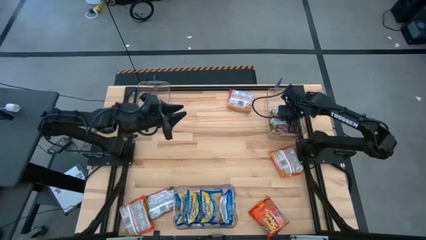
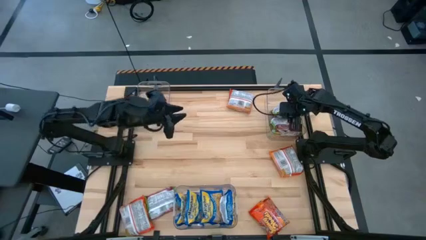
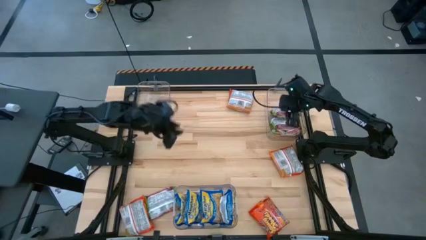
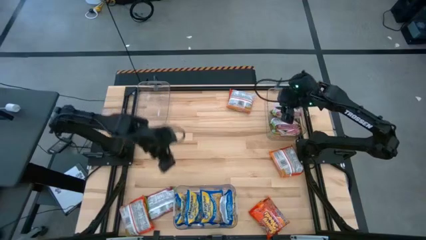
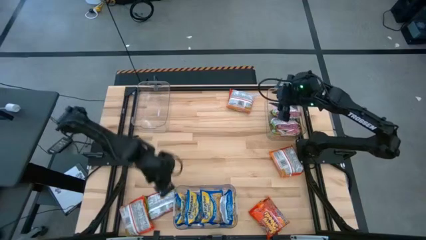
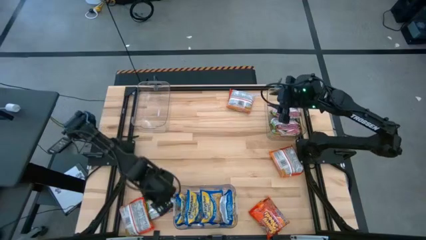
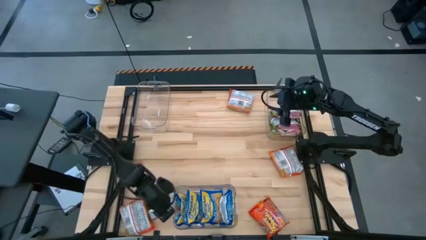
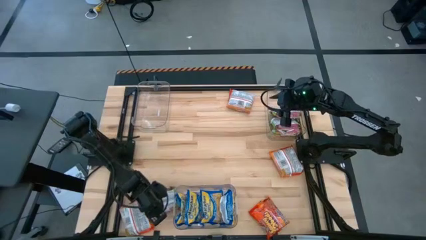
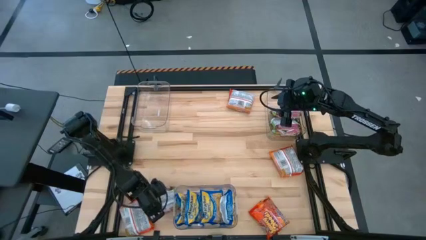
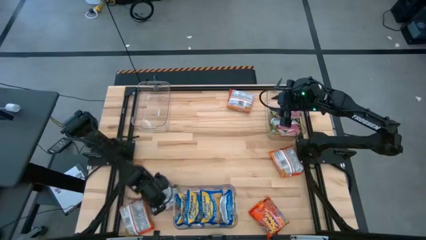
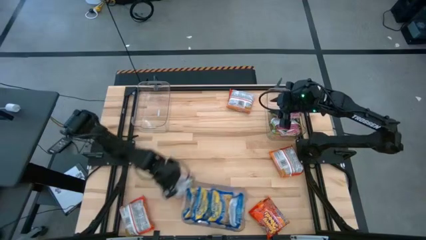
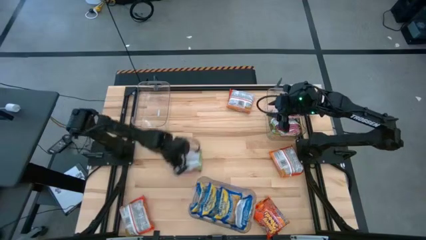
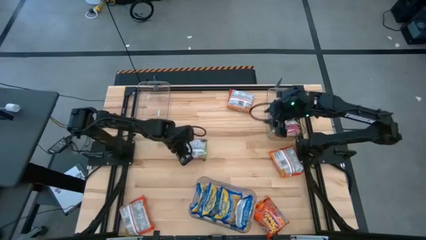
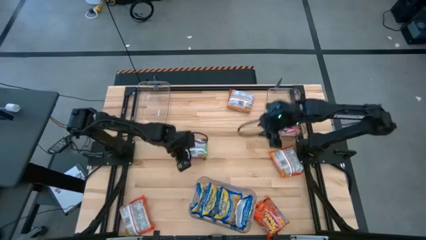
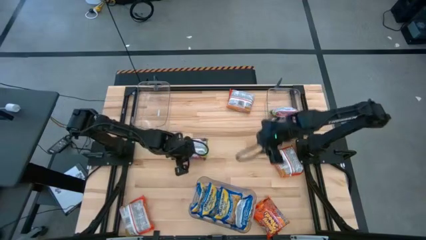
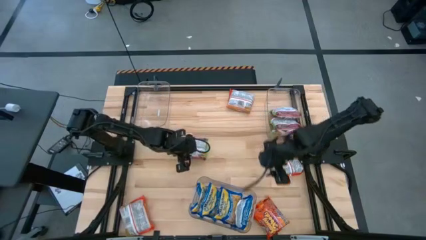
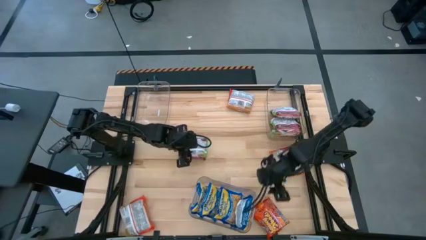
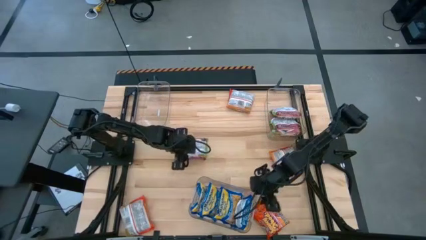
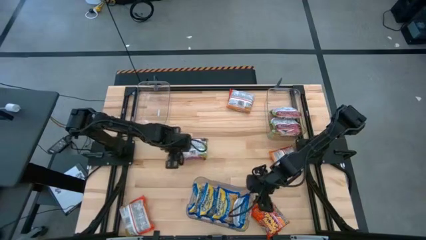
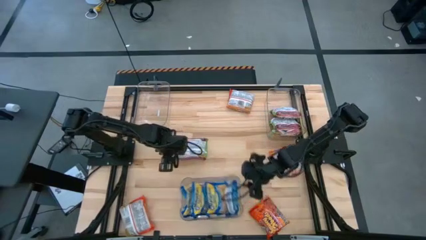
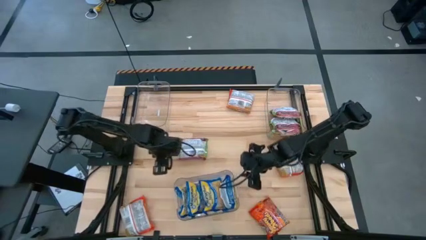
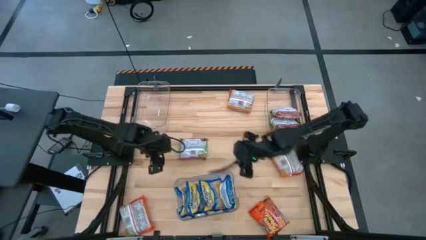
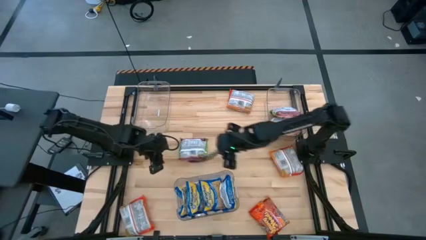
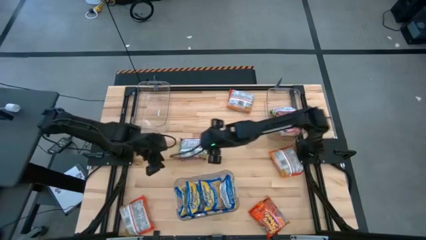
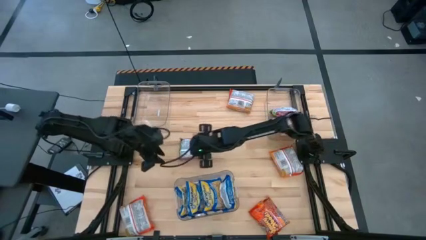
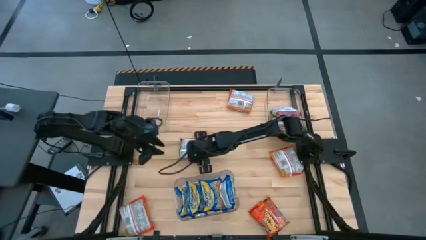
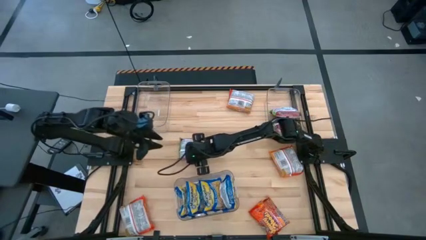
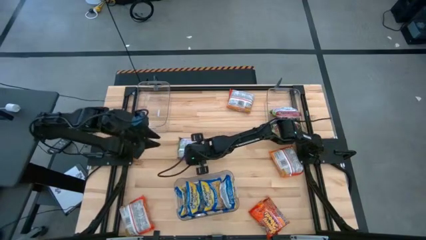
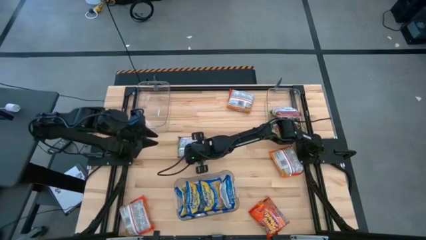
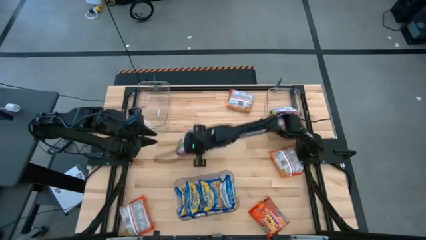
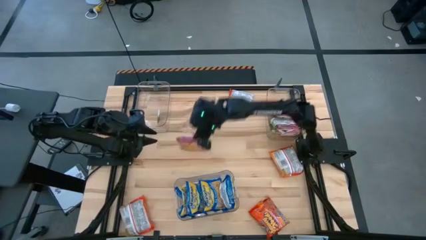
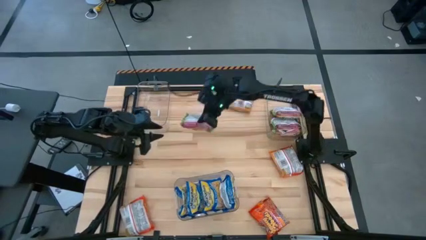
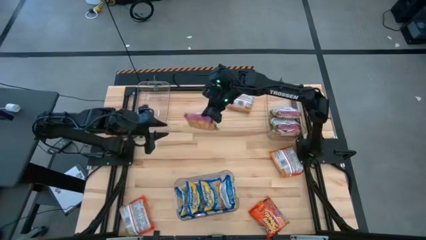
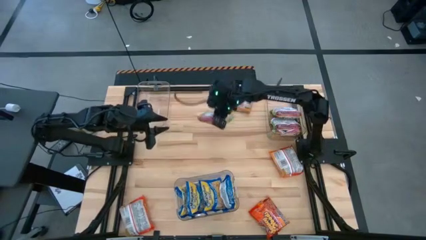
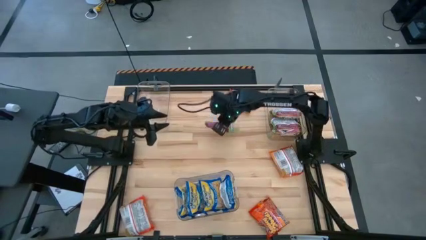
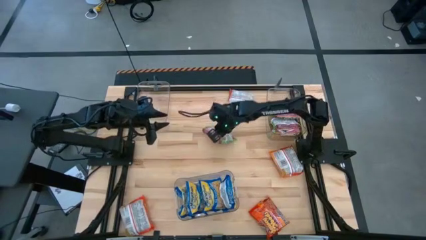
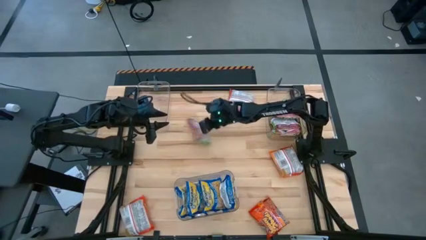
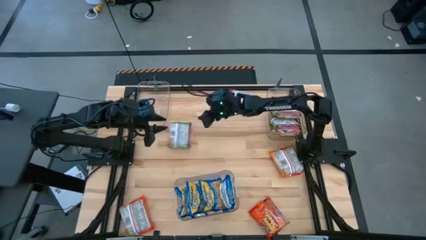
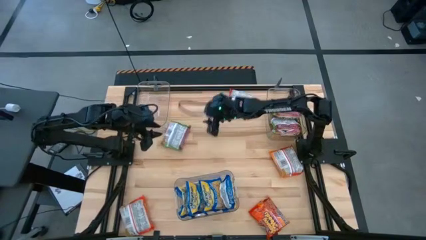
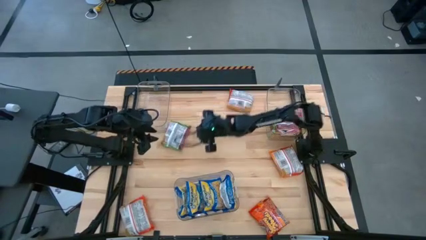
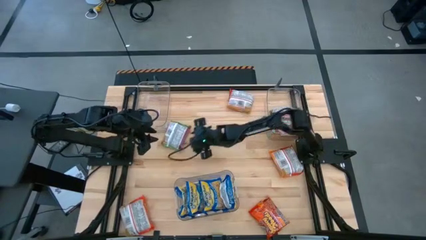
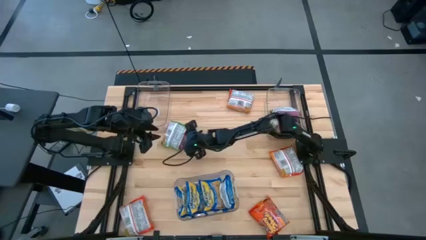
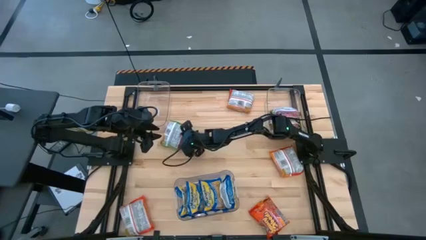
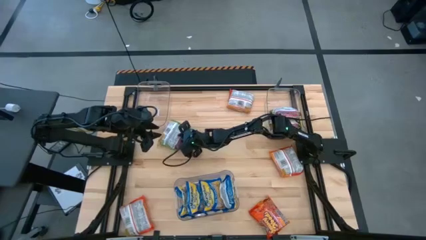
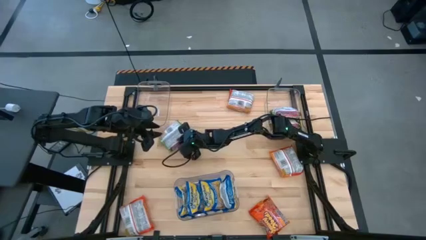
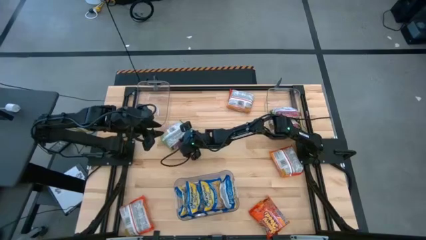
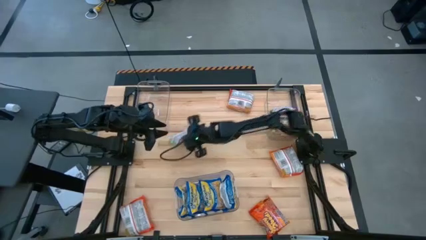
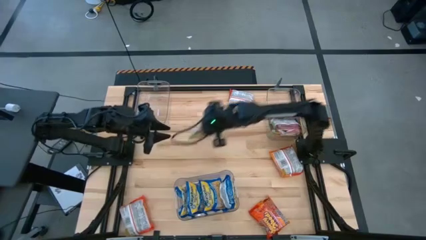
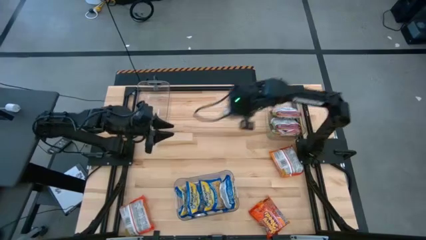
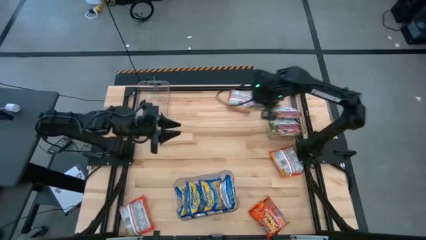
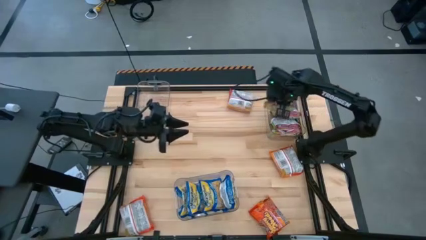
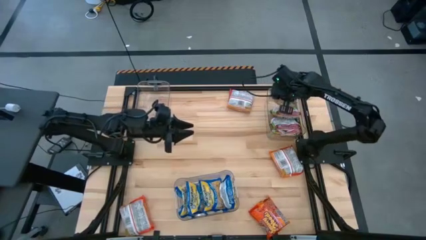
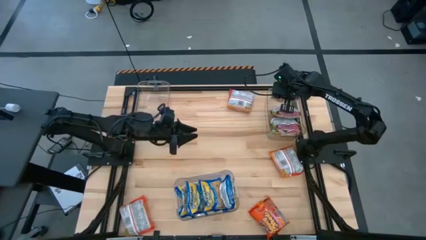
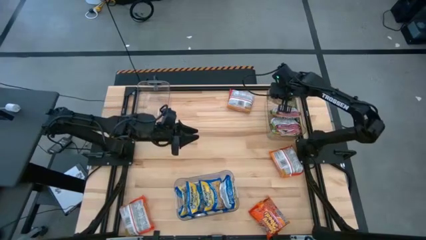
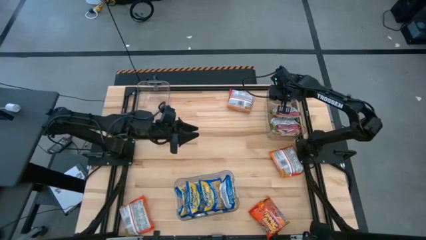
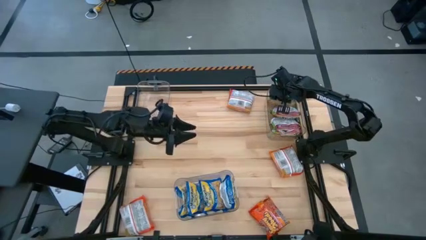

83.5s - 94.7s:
Task: Sort Maruchan noodles
Put the green noodle pack into the top right transparent bin

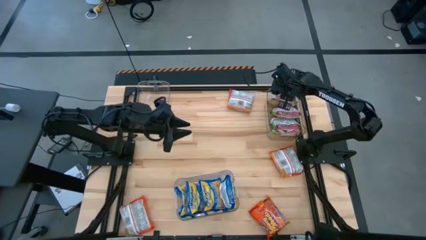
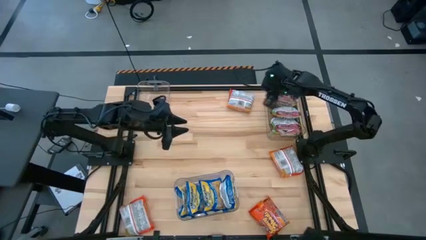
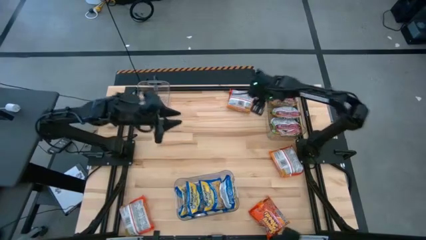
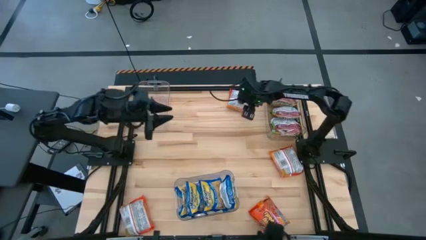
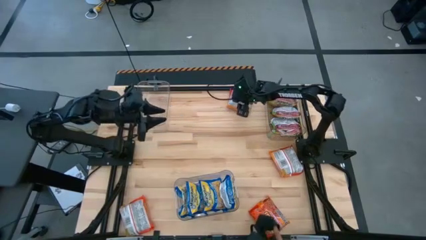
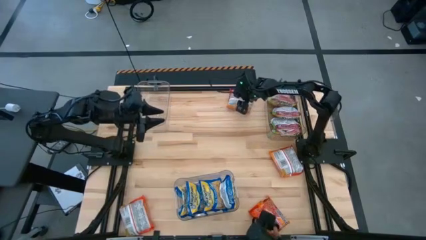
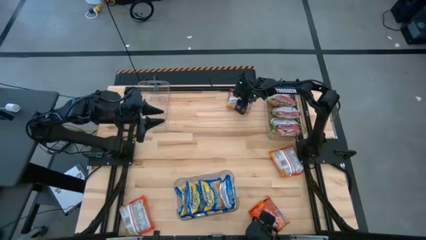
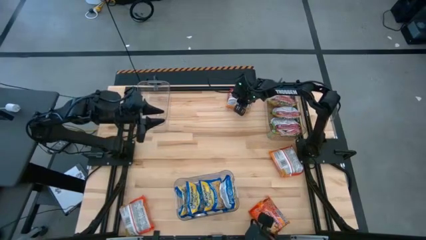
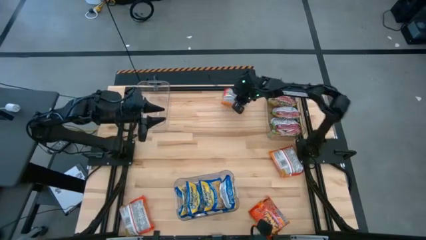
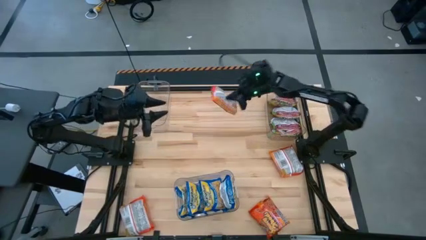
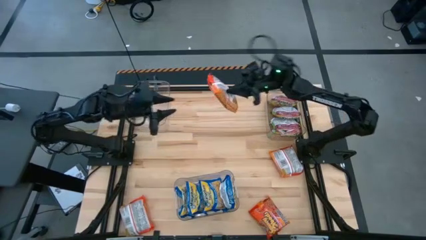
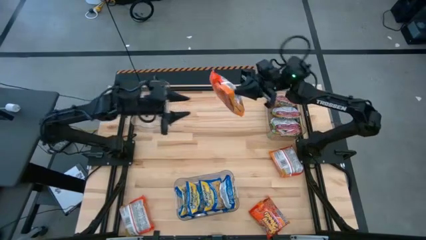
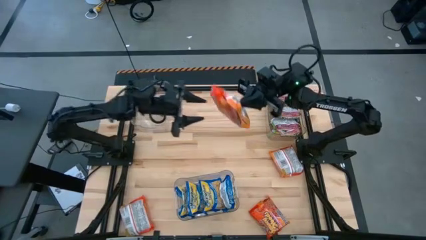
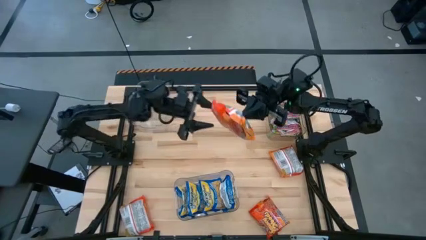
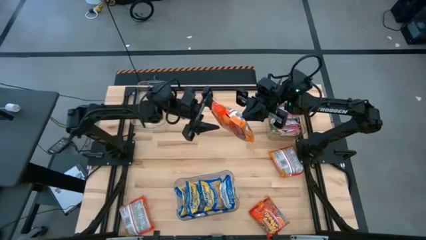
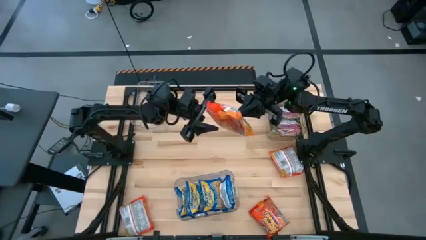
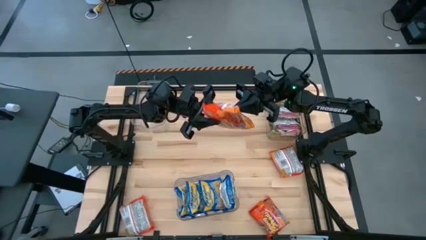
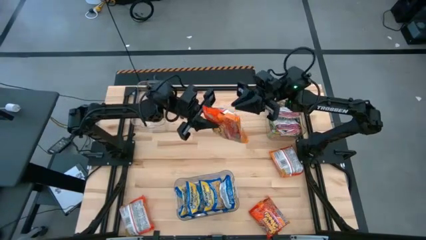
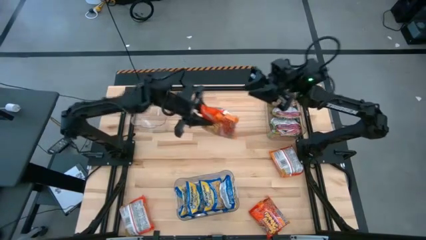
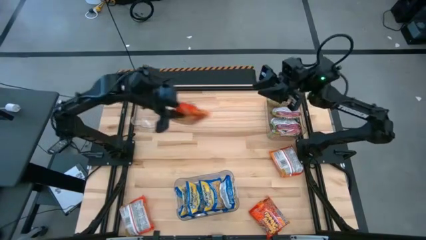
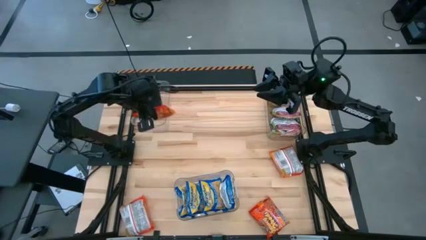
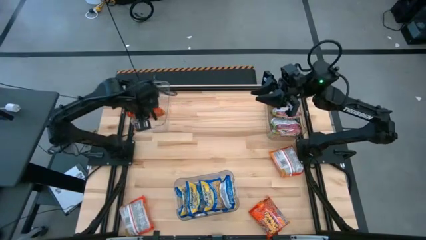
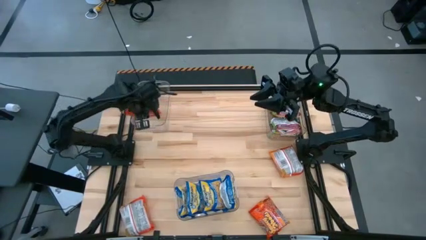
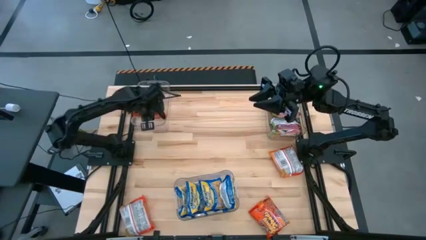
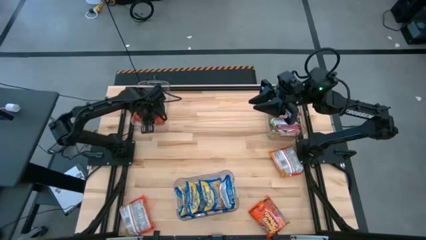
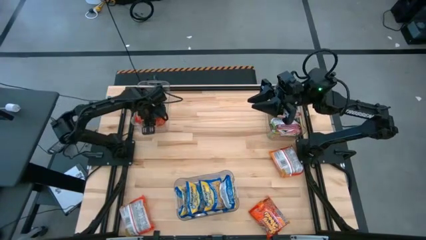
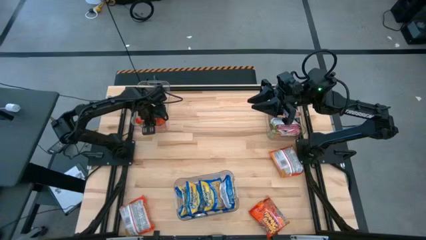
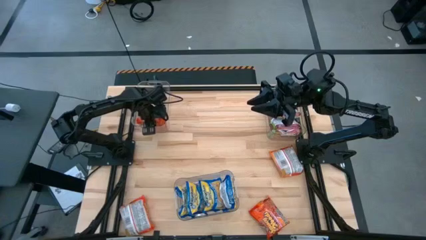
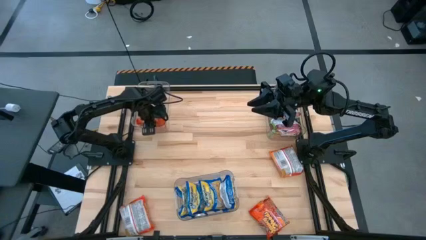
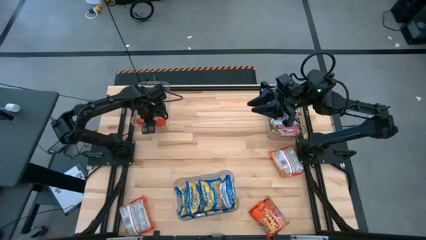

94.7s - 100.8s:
Put the orange noodle pack into the top left transparent bin
